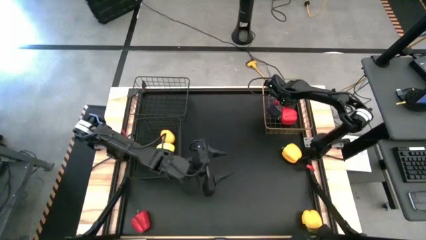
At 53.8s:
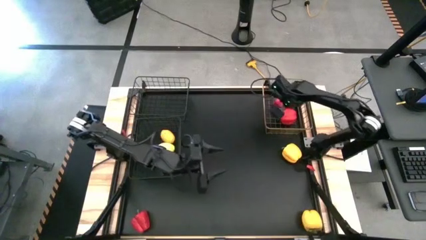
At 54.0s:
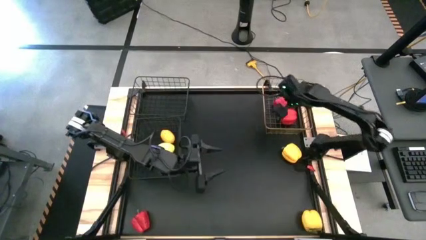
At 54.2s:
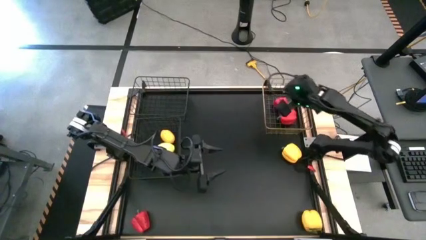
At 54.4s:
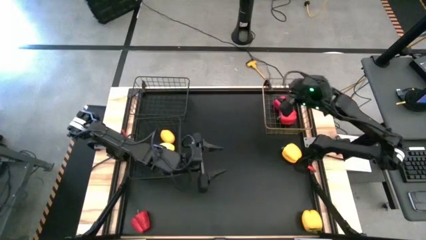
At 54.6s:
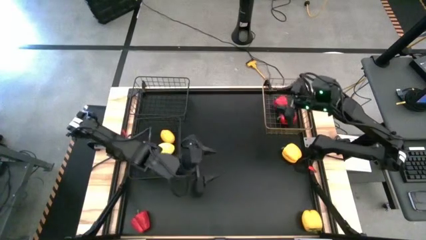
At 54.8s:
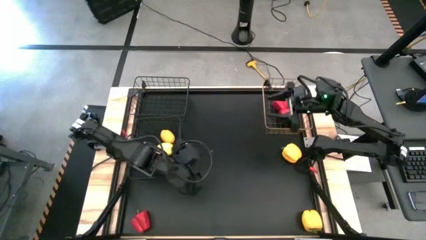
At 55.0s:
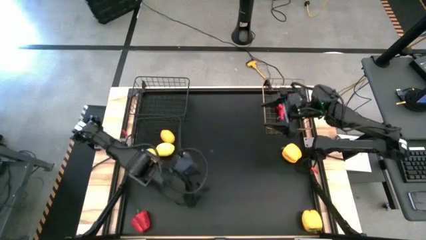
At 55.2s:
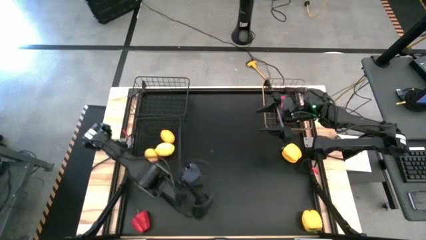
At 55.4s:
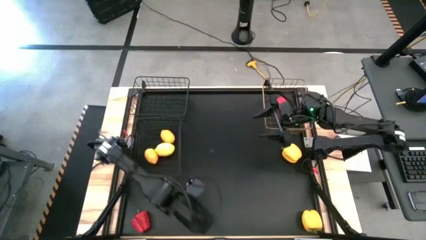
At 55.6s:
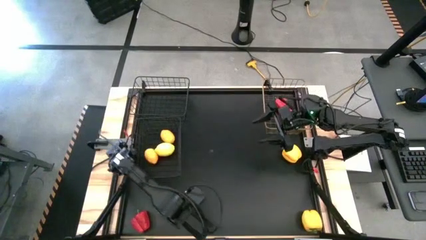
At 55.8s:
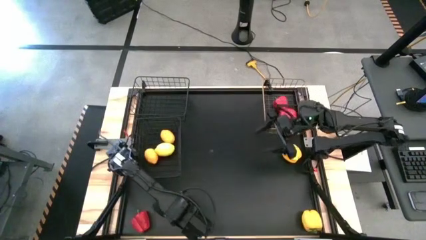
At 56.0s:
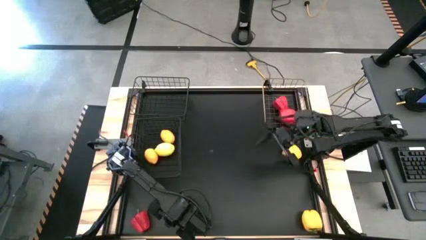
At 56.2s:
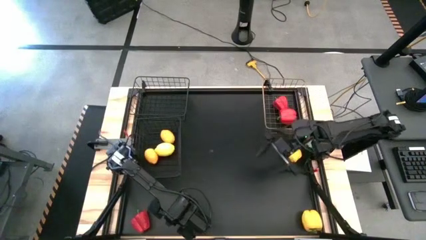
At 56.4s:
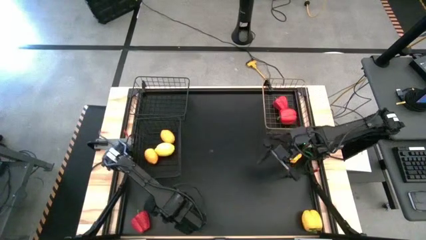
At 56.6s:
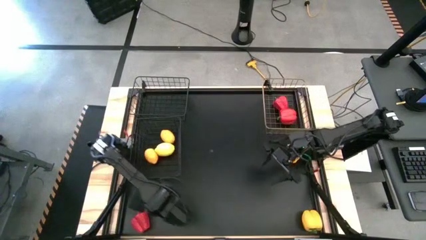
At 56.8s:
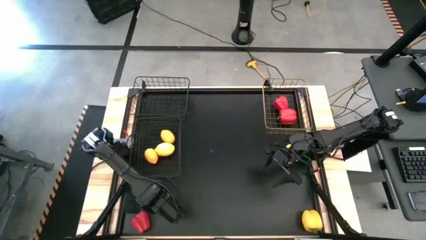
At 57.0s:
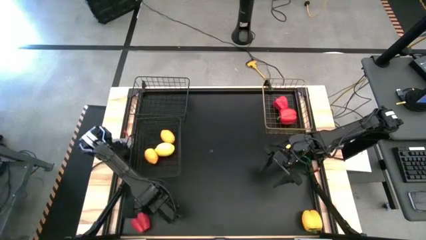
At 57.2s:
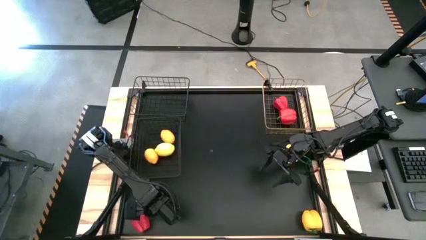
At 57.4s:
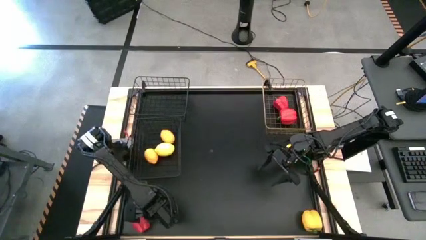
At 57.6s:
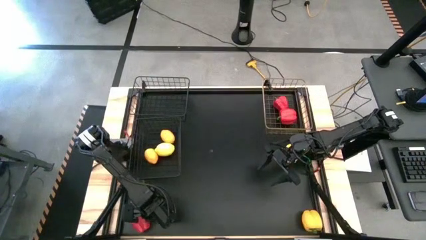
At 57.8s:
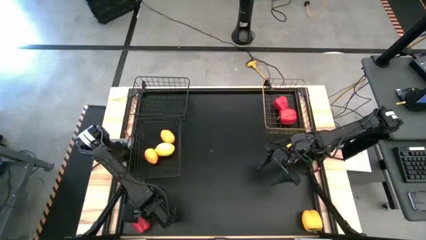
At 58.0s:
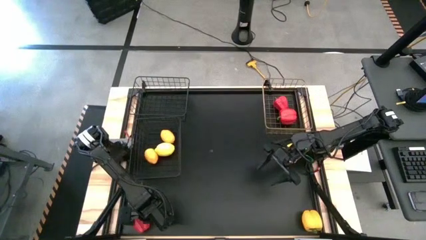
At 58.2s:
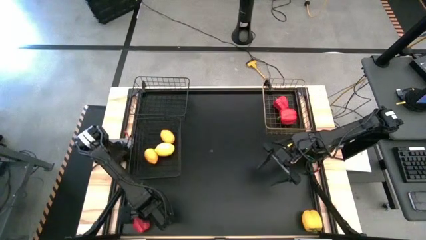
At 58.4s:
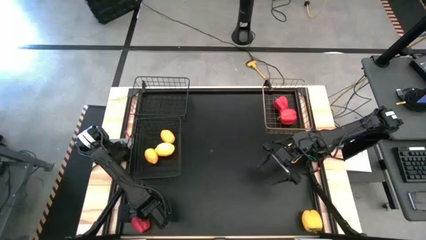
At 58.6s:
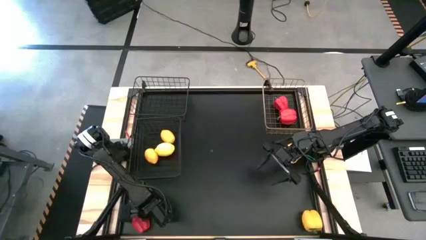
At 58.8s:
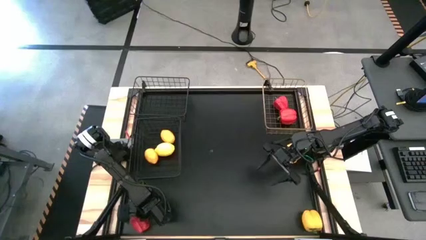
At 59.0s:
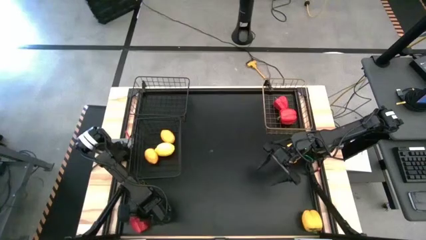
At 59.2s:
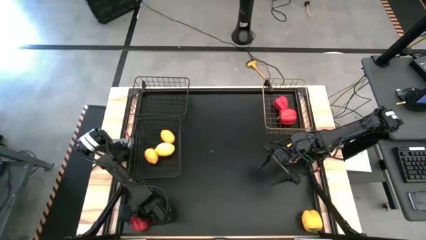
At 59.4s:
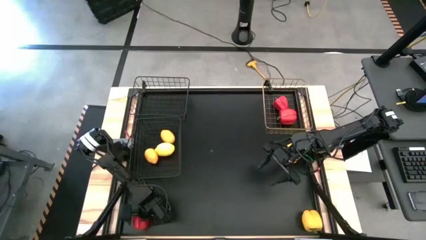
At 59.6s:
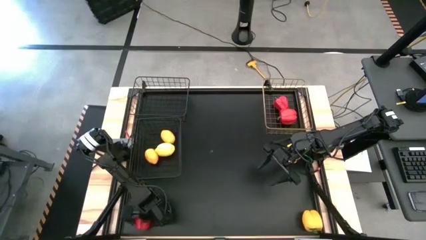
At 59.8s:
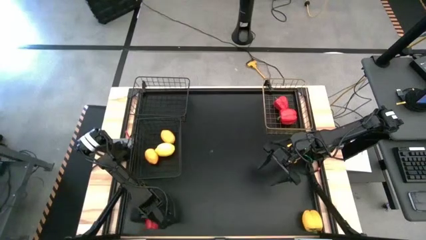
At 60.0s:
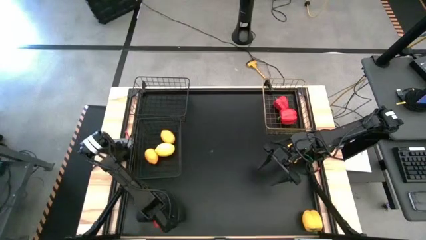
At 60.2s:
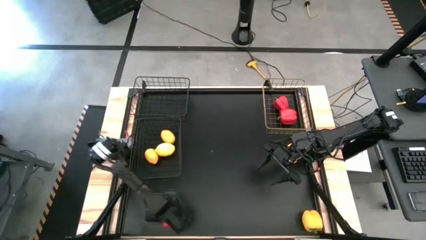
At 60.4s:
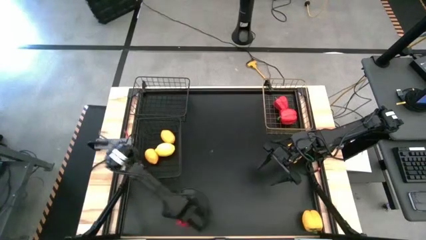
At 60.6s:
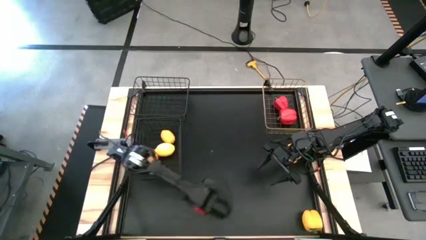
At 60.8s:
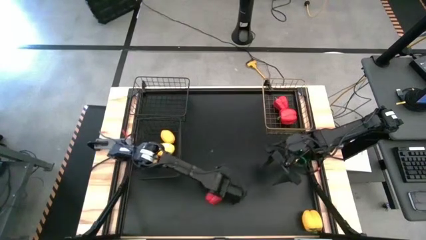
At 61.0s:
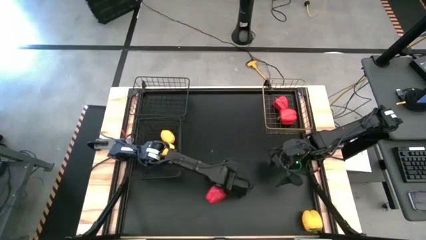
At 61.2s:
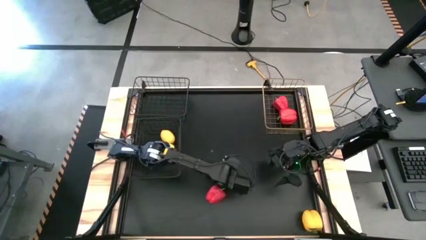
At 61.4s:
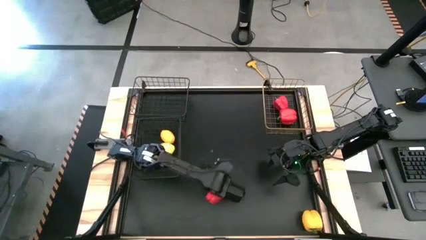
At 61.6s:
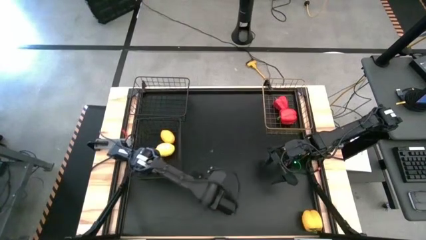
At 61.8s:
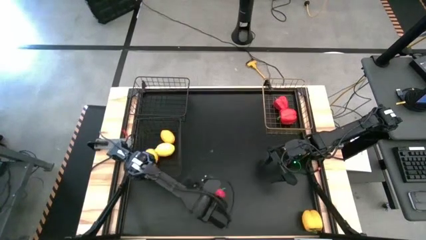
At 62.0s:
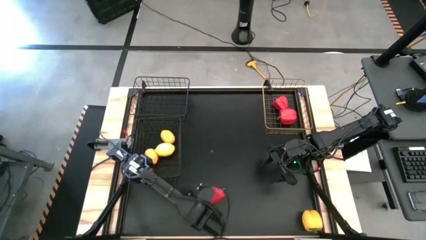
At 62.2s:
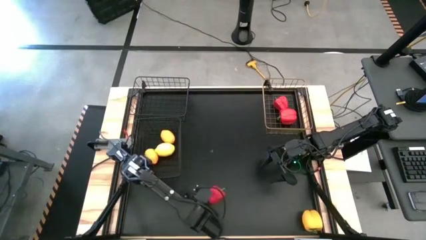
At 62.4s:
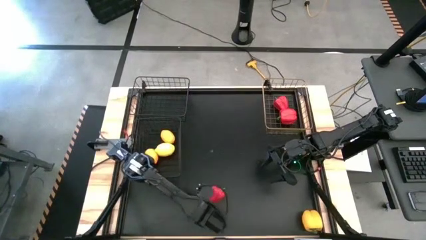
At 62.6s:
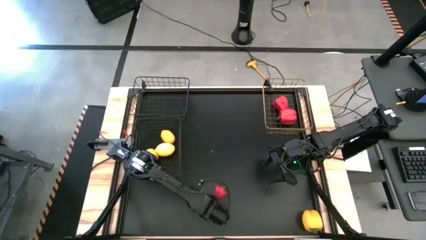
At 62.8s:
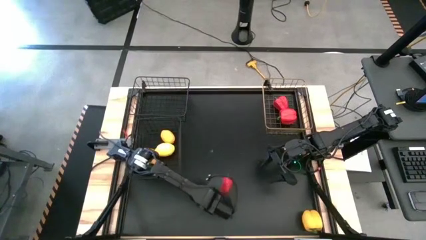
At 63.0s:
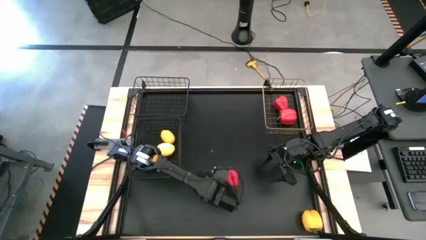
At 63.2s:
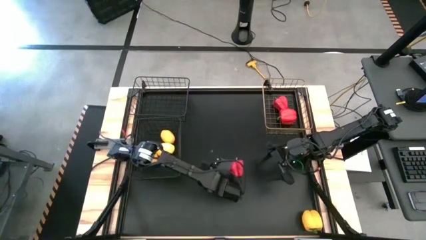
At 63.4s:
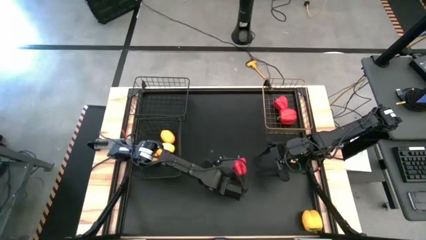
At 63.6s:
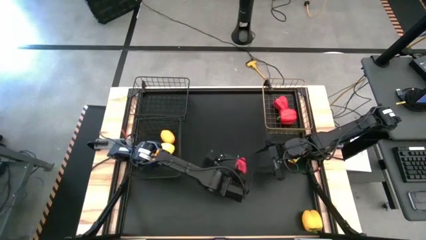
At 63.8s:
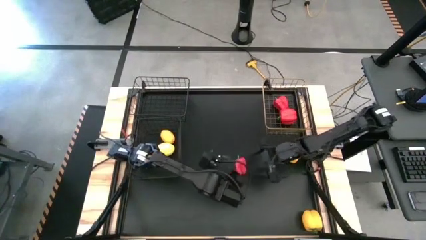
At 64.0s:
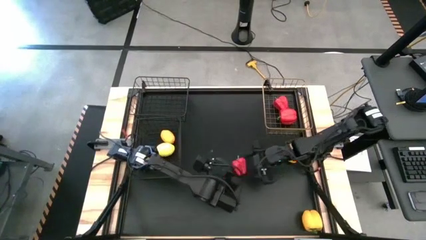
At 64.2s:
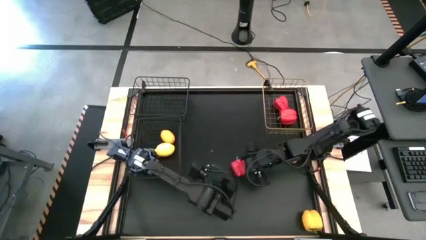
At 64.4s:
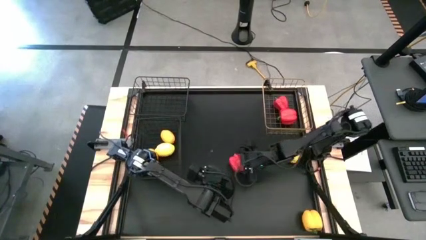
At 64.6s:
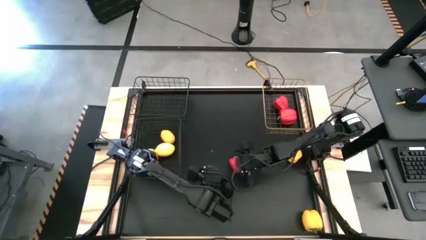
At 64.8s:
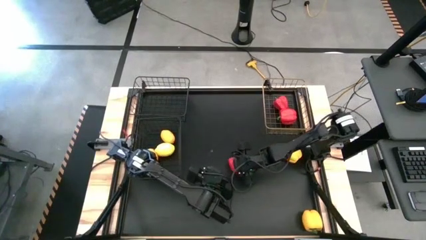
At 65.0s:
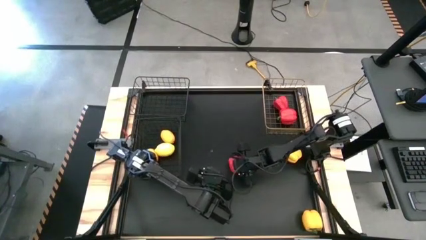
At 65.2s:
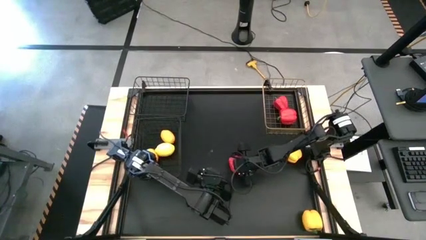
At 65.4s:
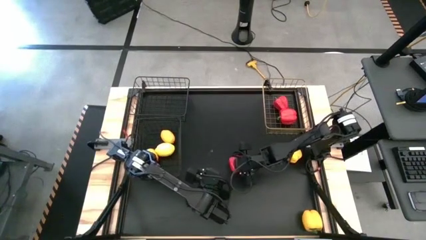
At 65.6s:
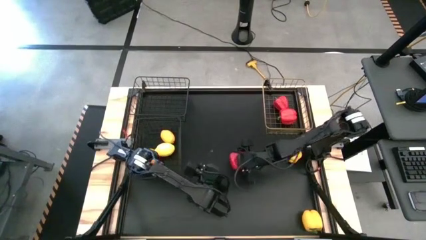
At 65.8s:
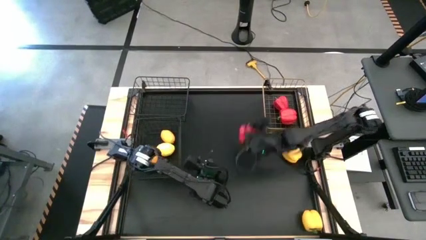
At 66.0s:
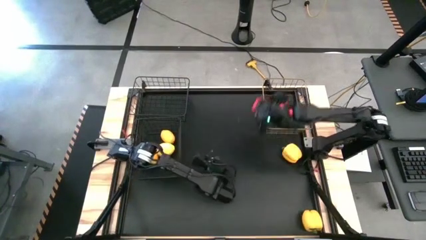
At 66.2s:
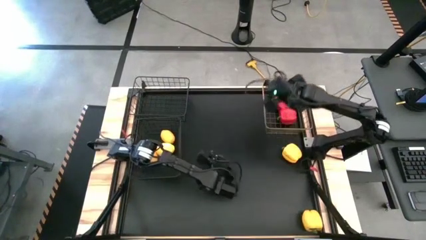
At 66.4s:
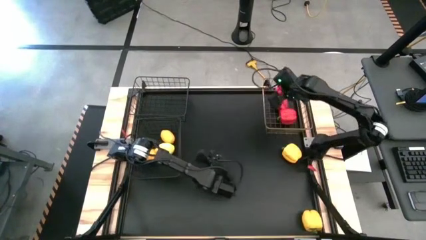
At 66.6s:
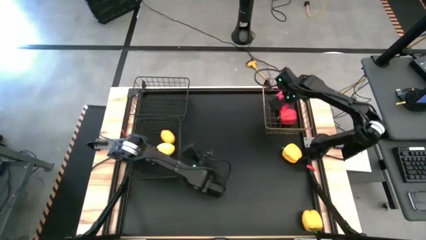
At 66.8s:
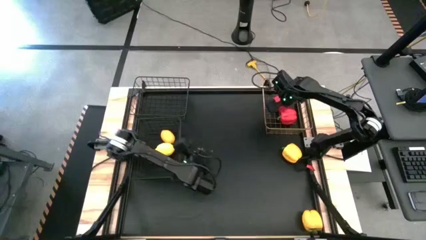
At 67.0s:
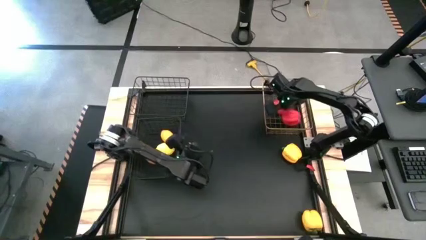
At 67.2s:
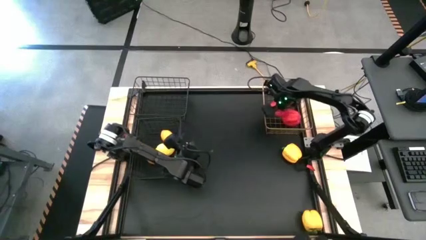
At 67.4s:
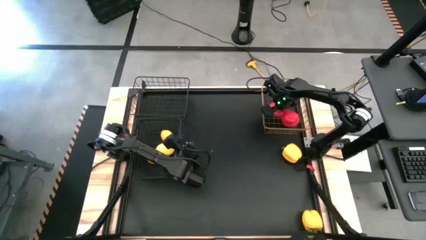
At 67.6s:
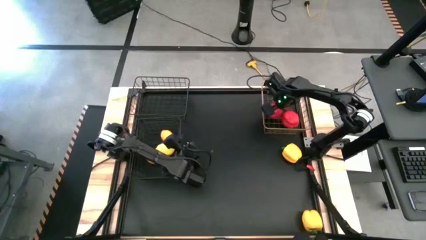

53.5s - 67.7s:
Task: Sort produce into baskets
Put the red bell pepper into the gold wire basket

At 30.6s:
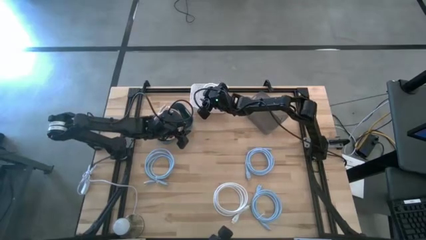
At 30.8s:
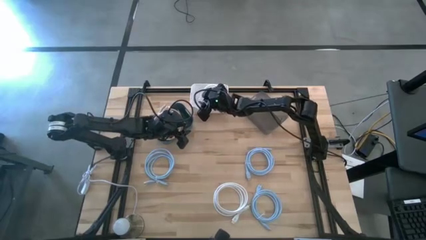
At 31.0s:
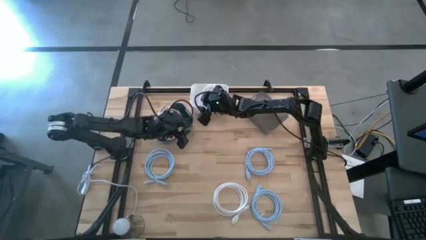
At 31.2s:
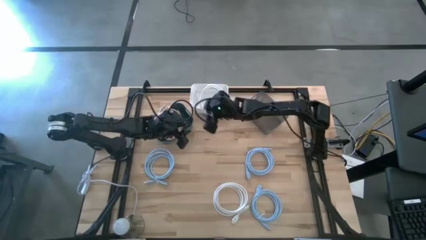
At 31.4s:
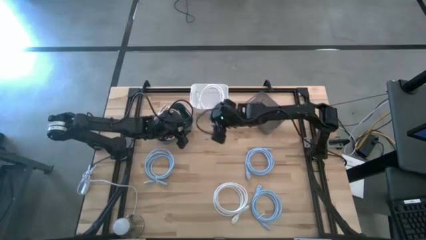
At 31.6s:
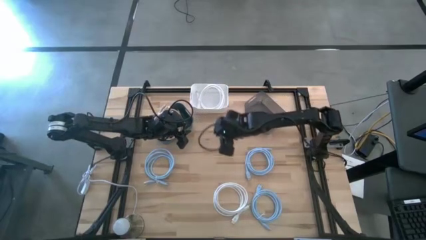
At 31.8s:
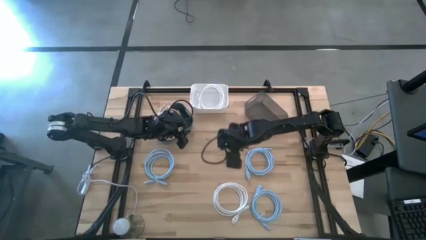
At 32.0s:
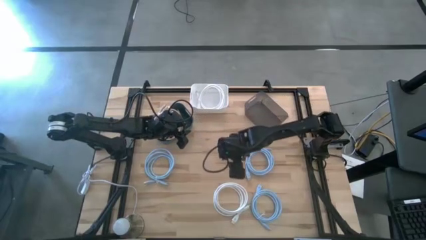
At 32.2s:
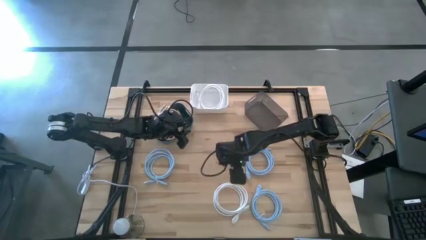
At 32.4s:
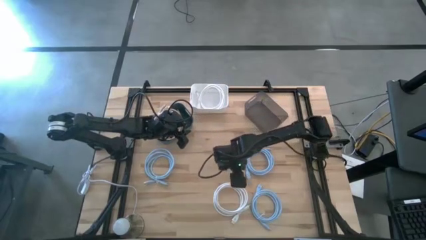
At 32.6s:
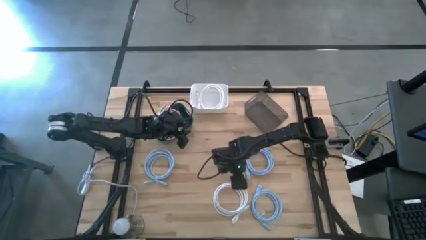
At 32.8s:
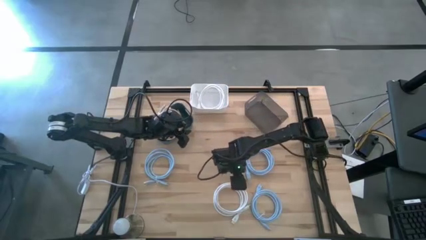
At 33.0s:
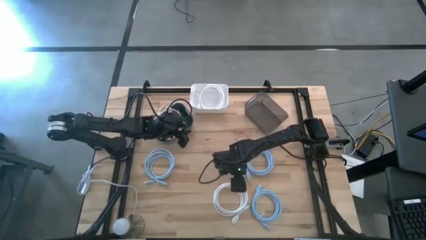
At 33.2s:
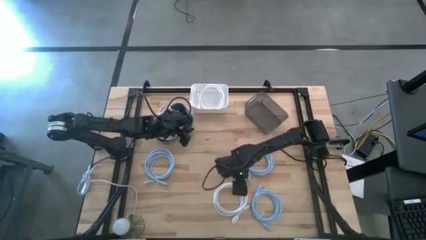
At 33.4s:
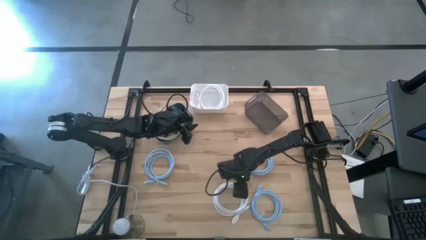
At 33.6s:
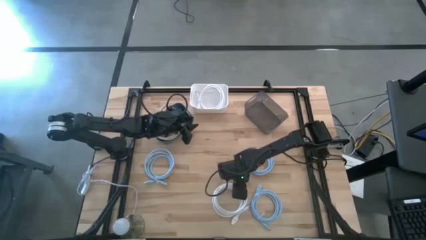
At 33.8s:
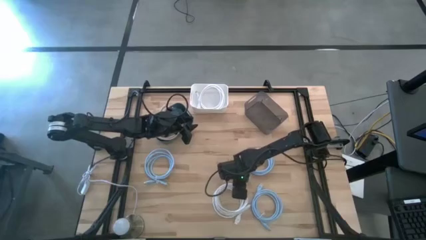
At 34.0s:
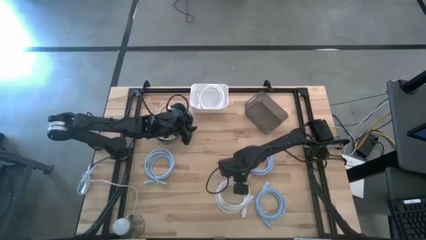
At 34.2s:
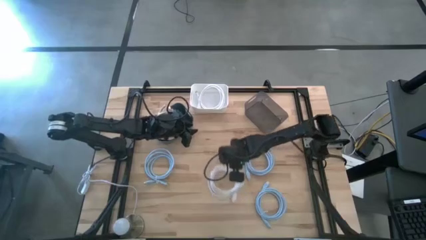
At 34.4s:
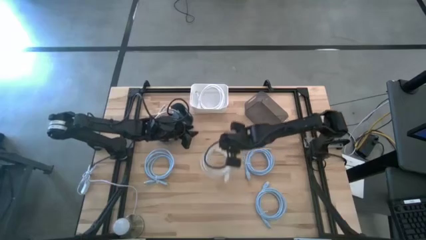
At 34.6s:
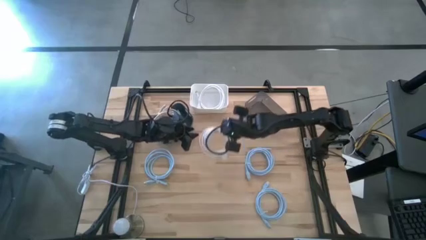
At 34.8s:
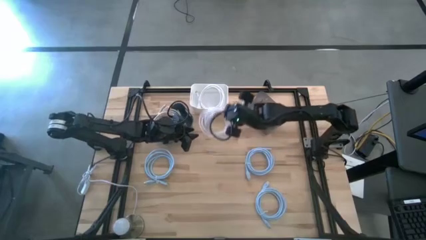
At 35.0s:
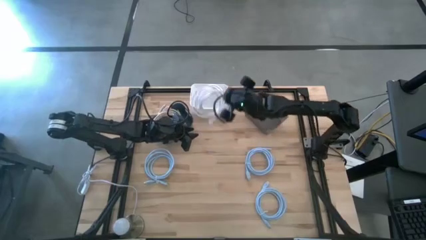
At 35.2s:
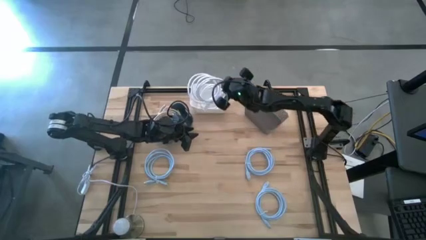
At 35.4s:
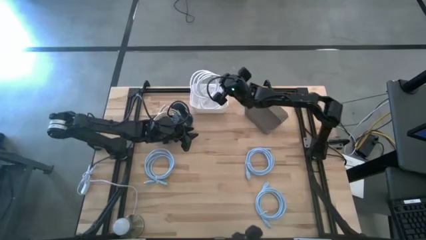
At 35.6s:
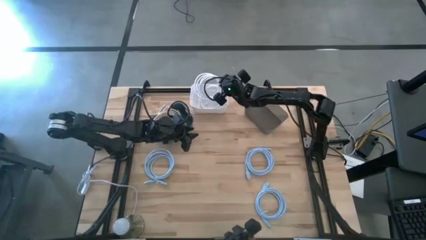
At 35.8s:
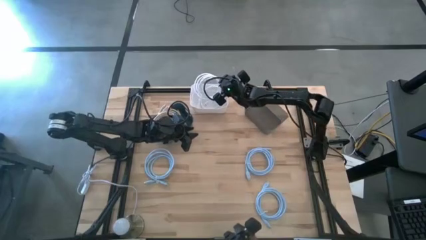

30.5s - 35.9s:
Task: Sort HDMI cables
Put the white HDMI cable into the white bin
